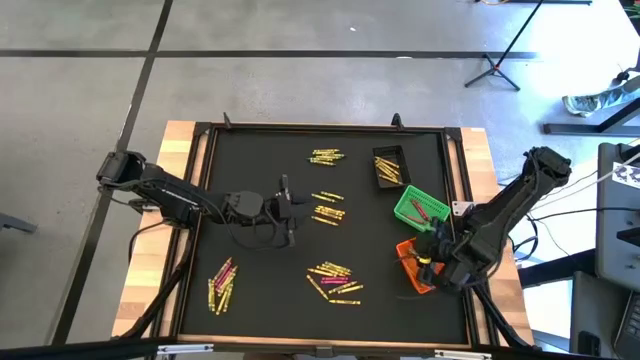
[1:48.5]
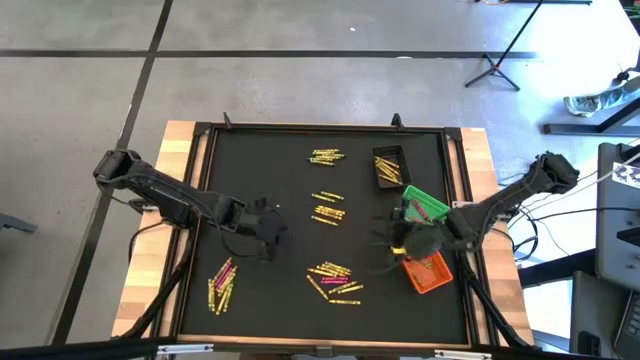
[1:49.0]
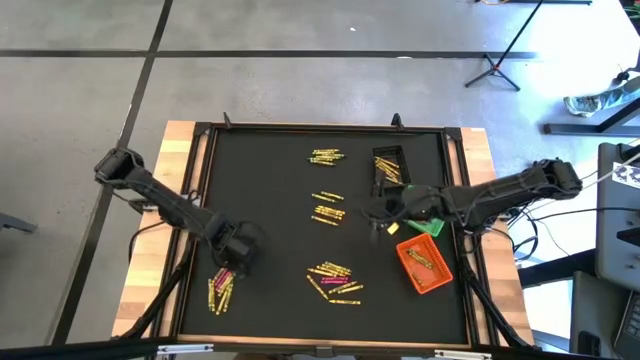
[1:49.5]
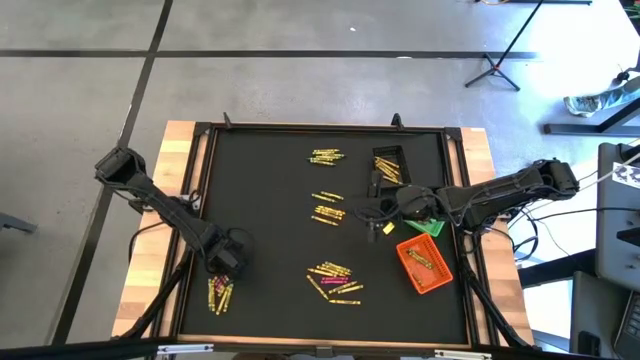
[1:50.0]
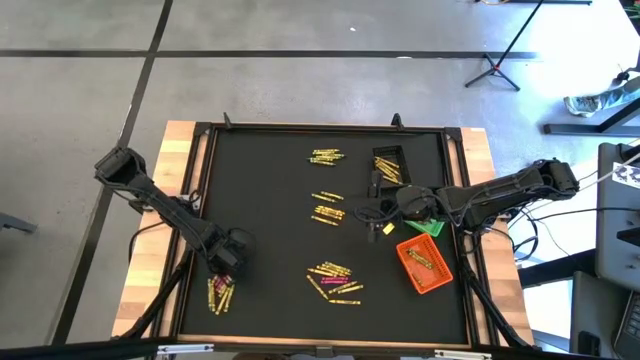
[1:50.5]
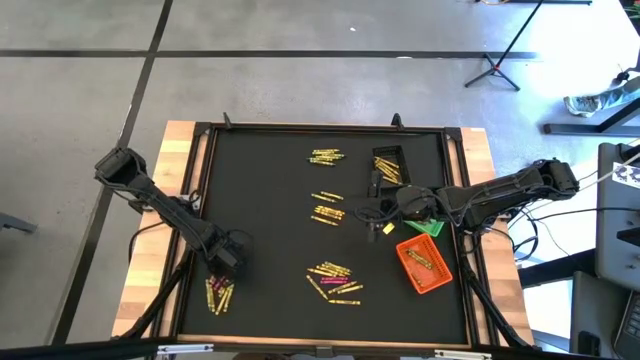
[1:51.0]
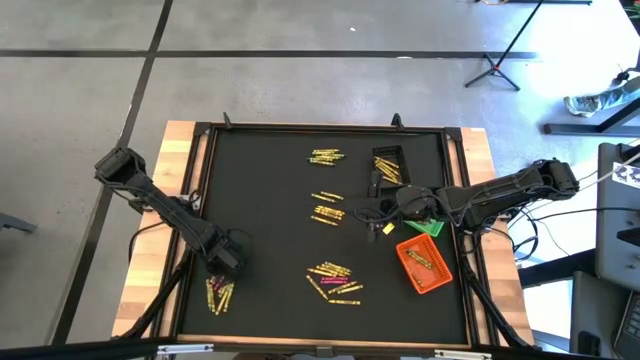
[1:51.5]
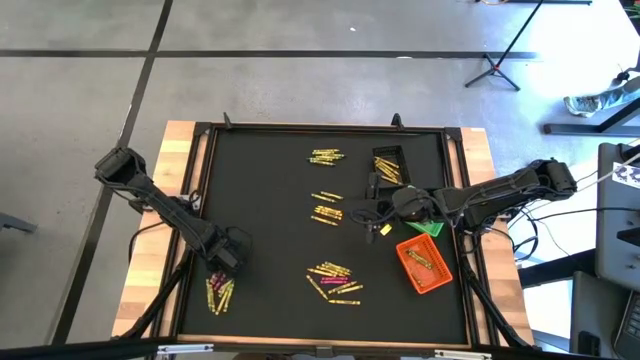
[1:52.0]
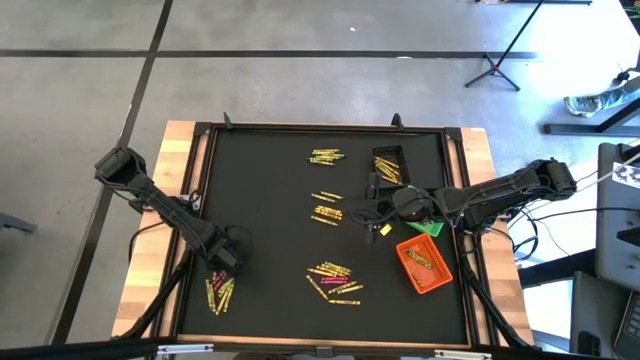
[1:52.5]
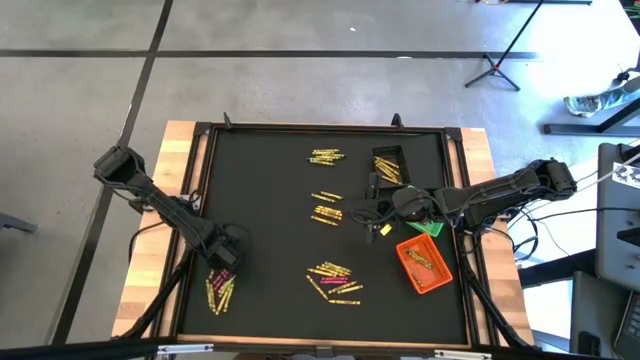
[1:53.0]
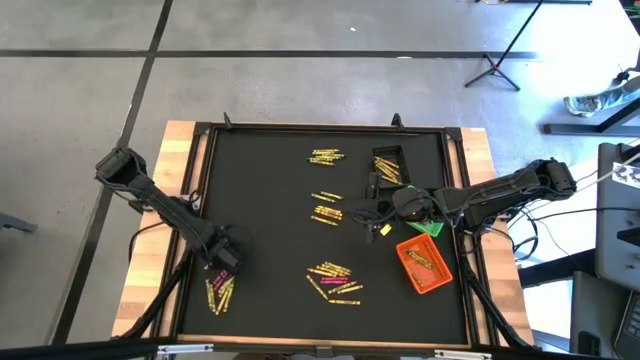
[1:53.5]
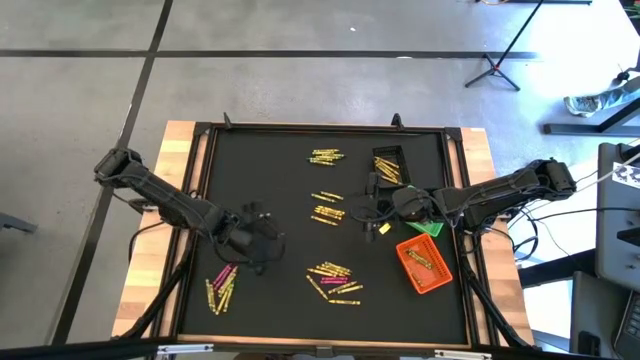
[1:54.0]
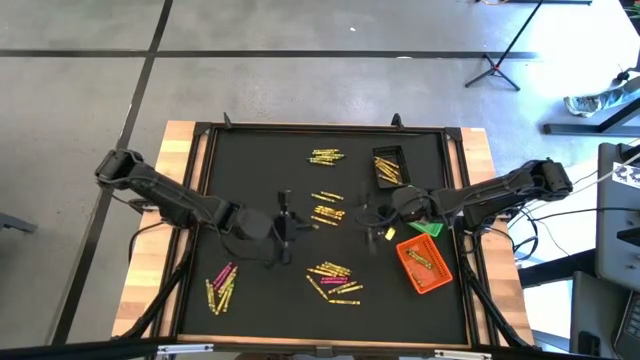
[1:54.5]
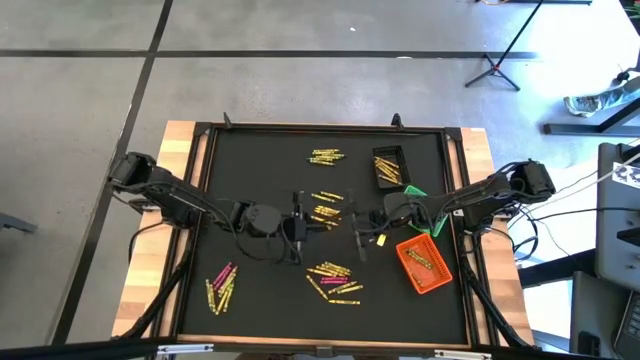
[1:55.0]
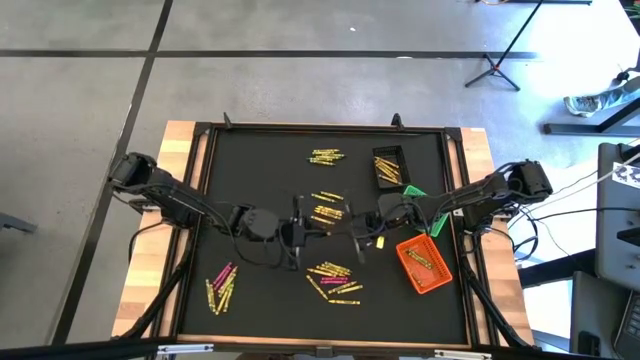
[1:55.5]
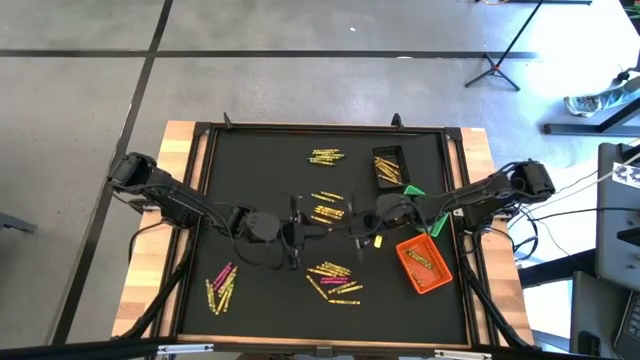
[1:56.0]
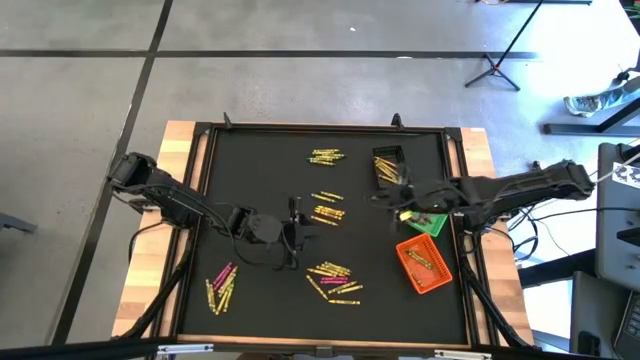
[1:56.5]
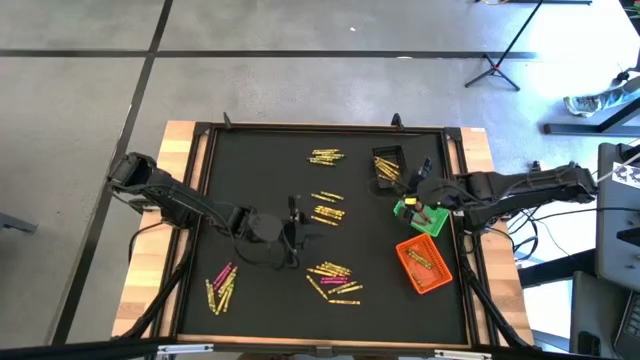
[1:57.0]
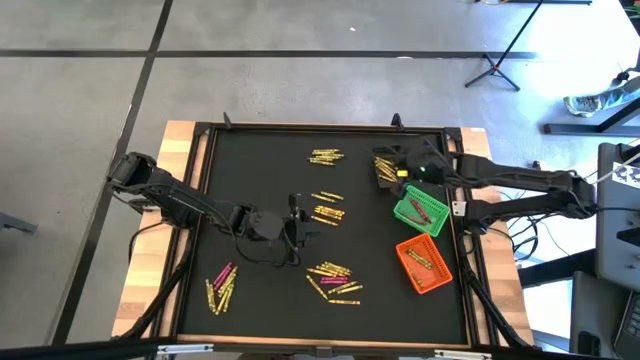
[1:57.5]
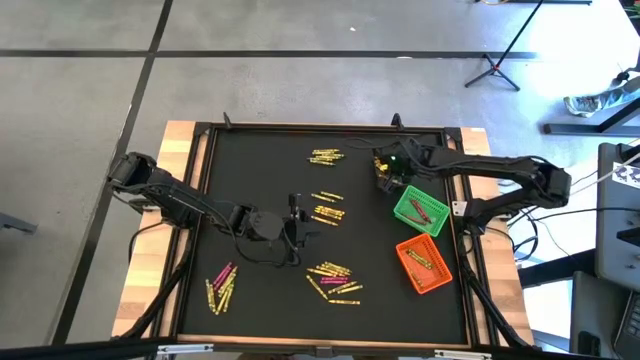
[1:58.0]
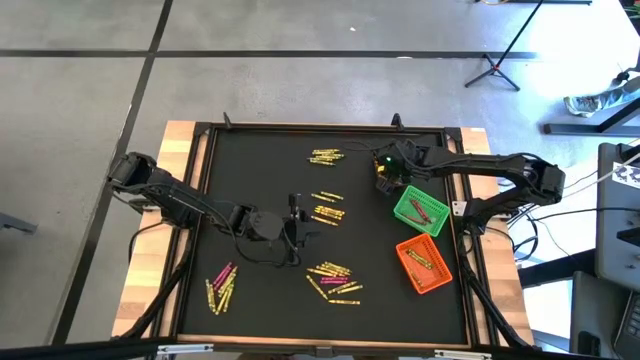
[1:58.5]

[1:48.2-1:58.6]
Task: Sort crayons
Put the yellow crayon into the black basket

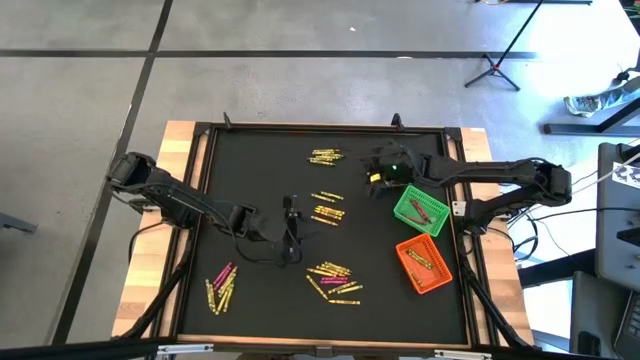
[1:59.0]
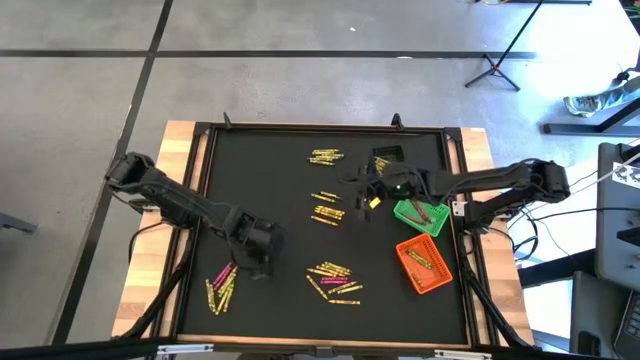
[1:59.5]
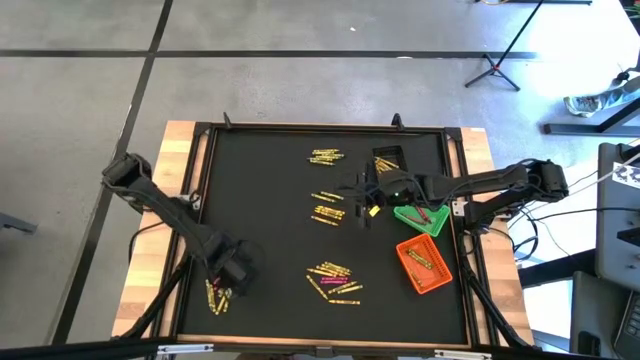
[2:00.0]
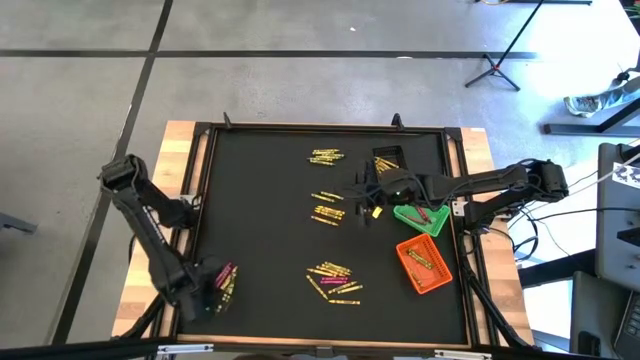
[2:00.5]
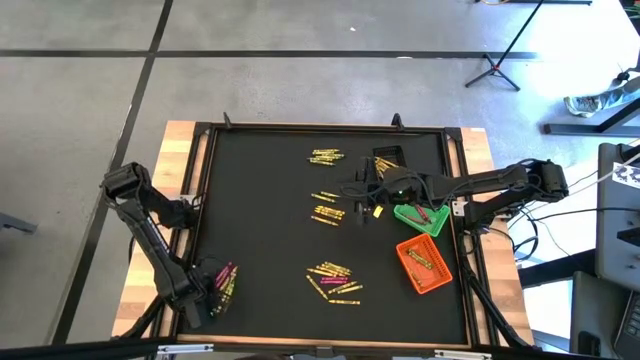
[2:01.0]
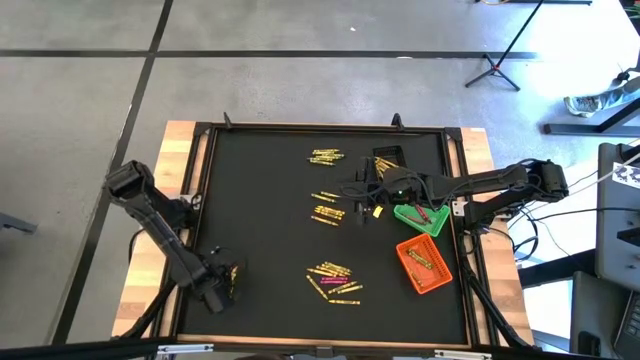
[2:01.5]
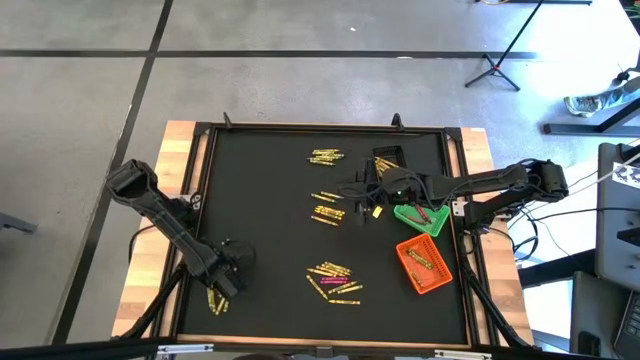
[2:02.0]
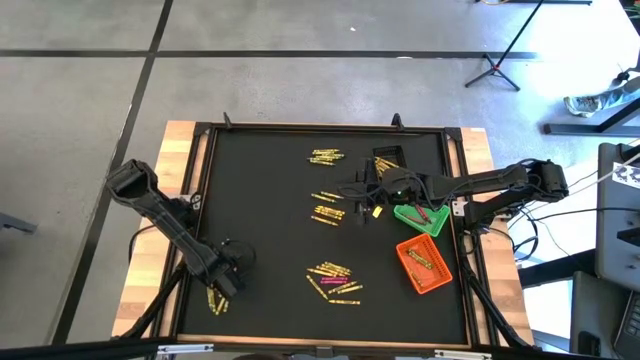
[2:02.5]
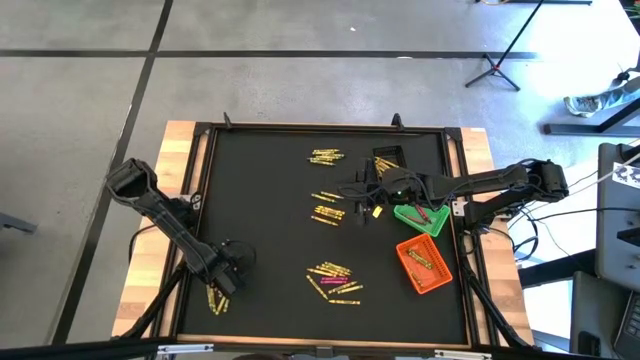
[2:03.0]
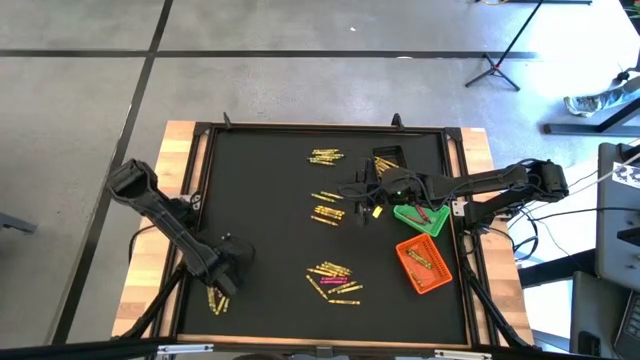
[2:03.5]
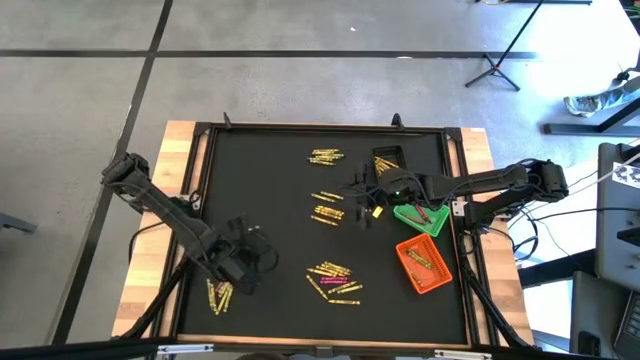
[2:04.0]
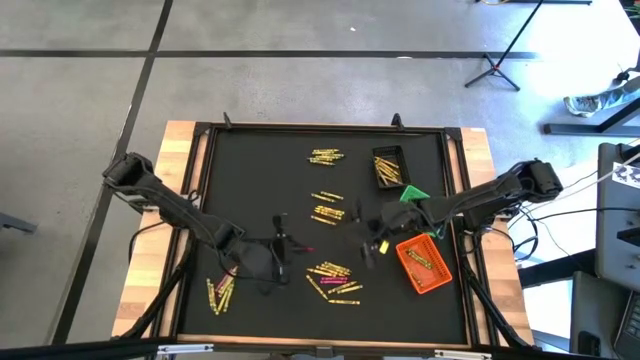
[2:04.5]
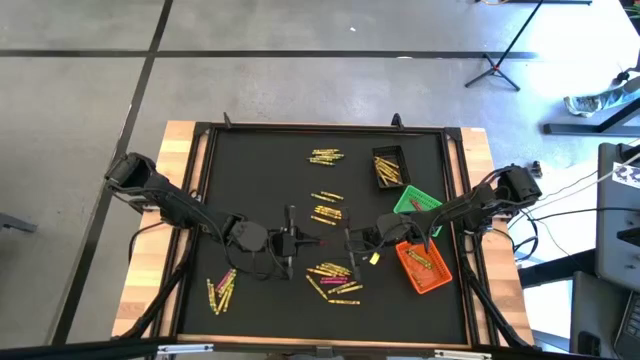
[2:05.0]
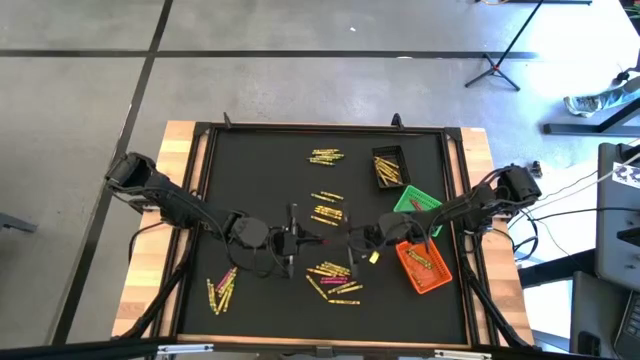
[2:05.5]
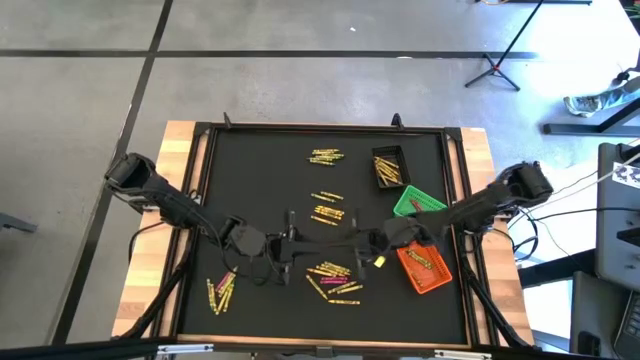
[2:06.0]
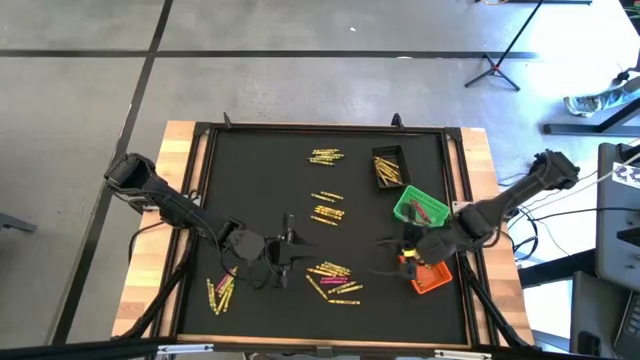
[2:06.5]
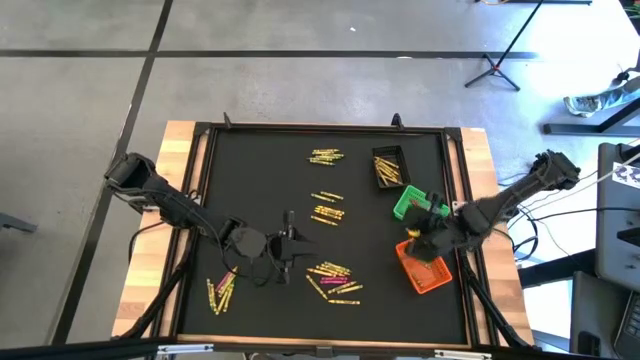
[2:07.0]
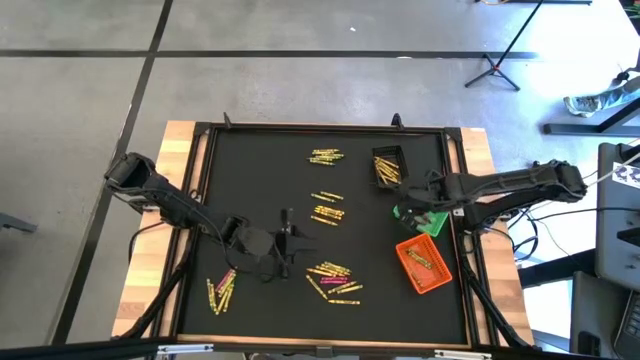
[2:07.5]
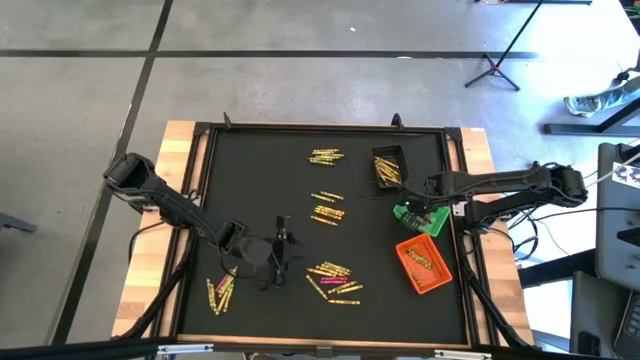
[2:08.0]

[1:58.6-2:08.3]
Put the red crayon into the green basket
